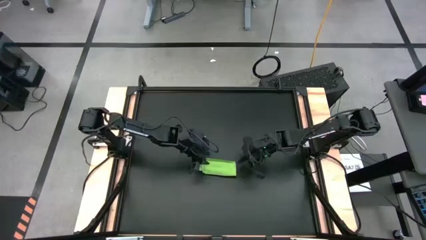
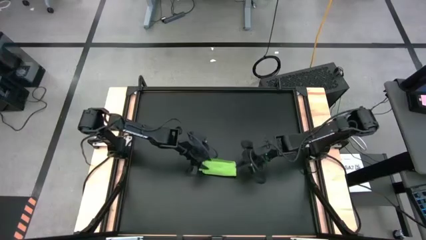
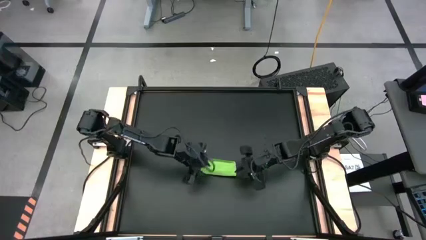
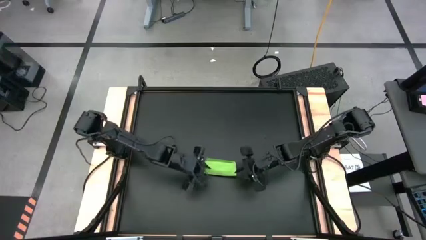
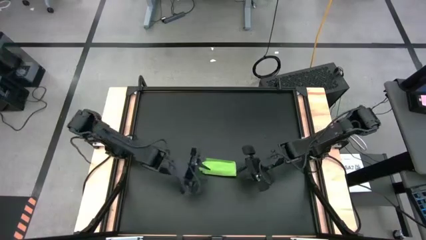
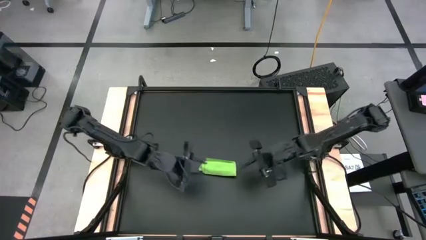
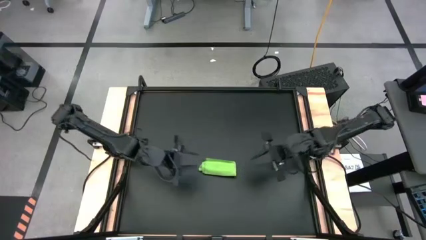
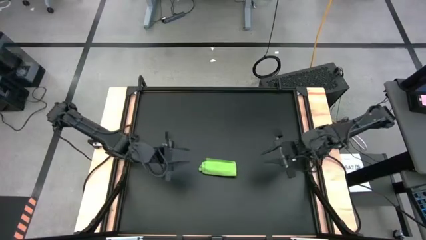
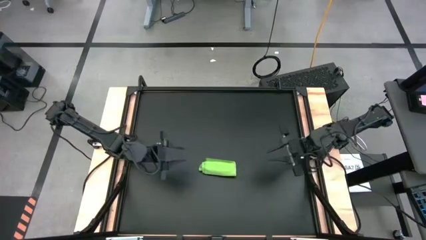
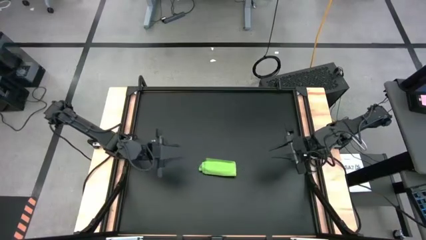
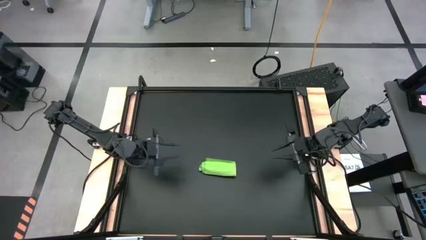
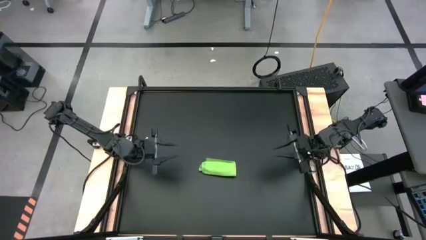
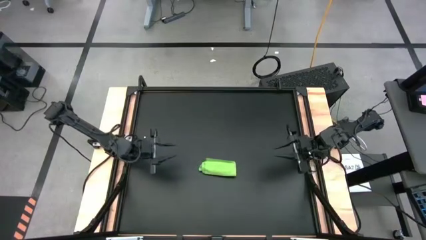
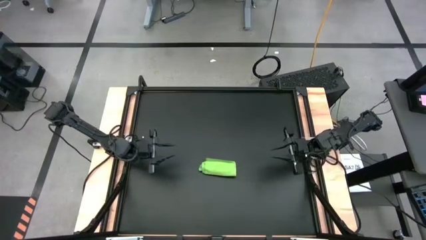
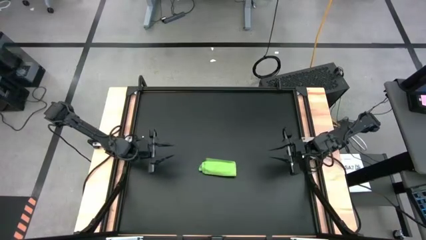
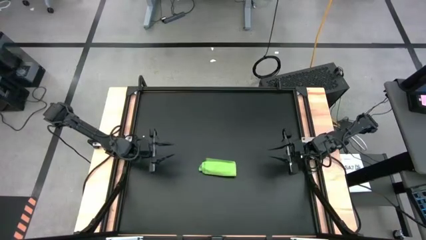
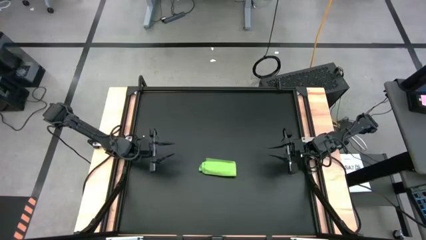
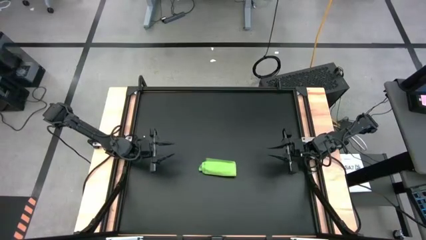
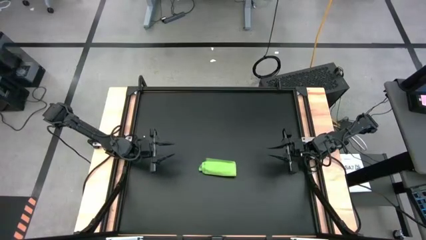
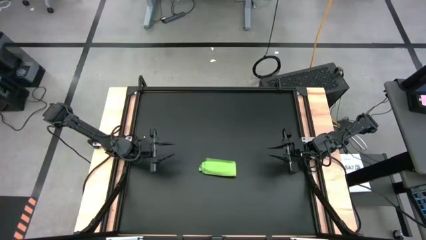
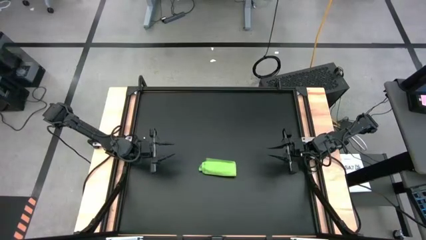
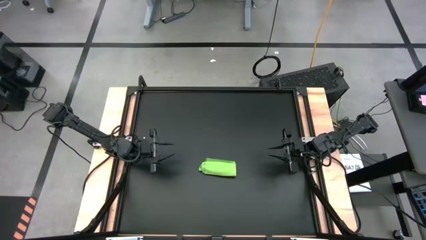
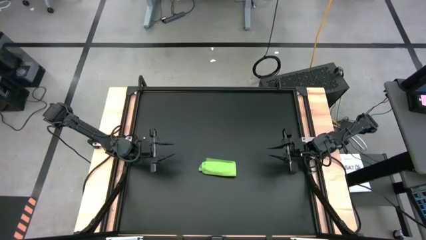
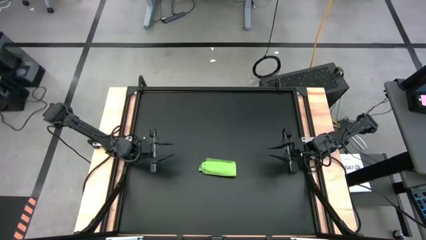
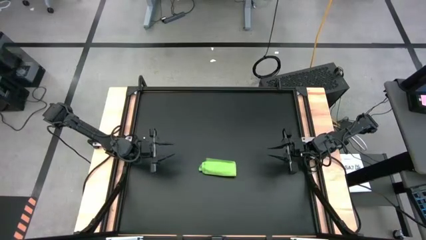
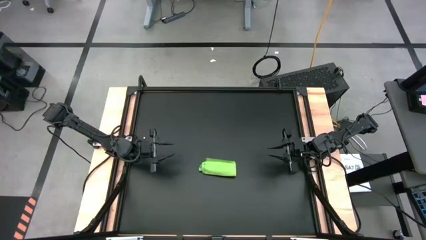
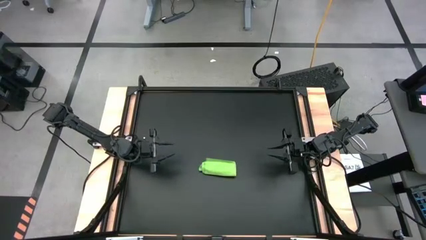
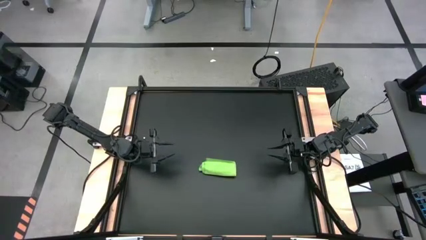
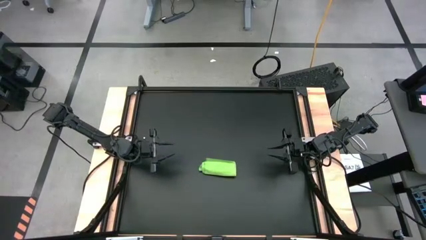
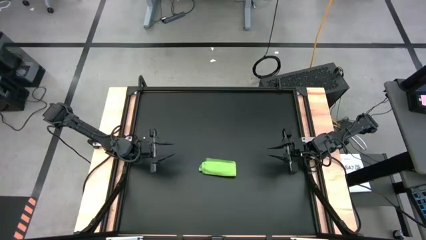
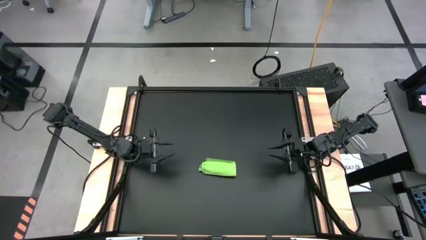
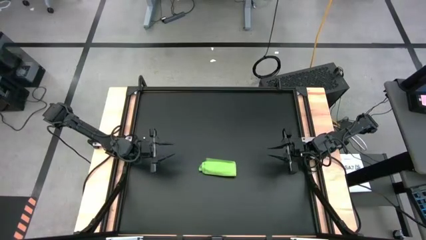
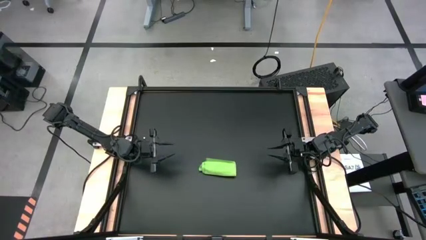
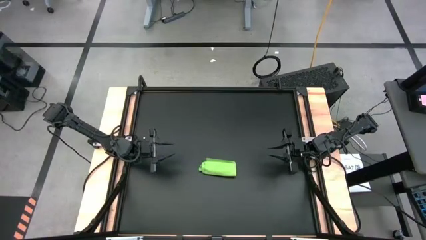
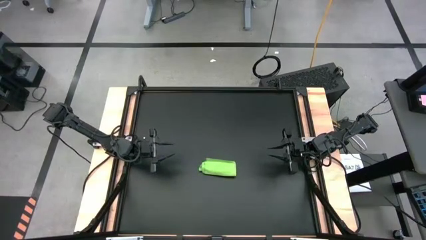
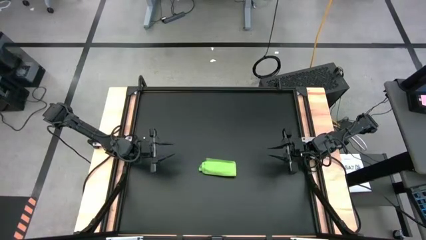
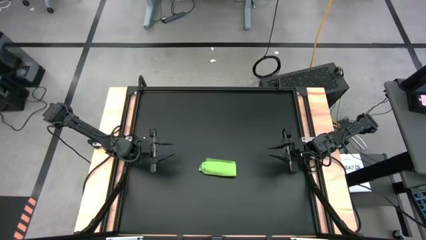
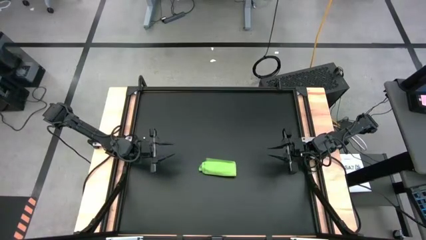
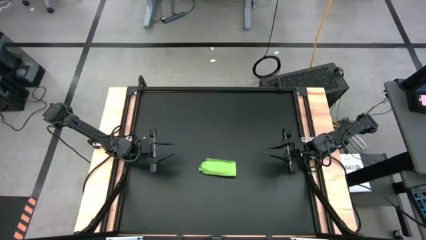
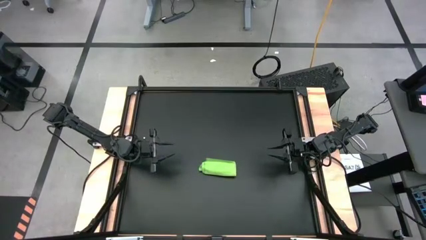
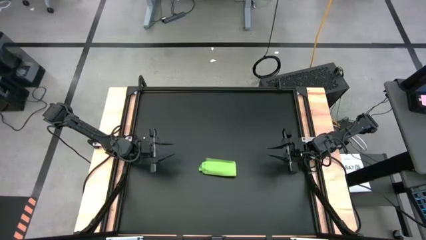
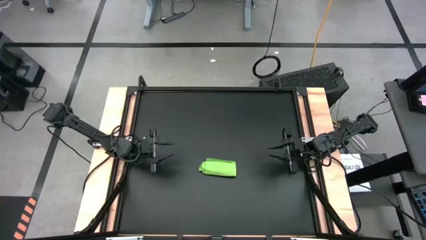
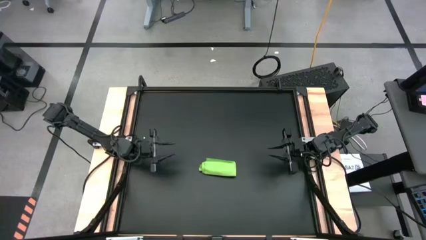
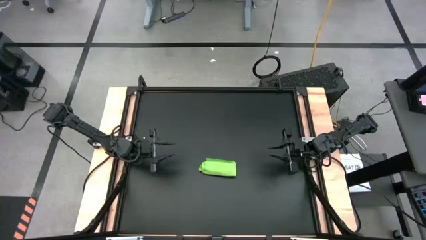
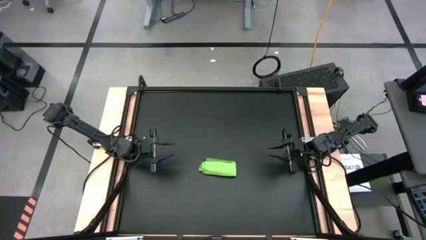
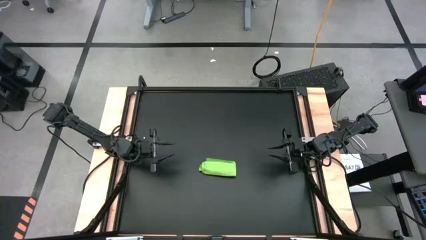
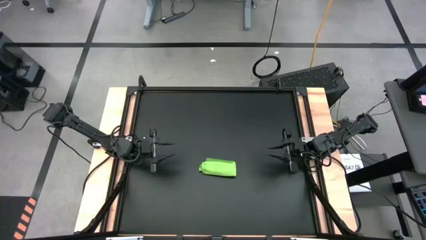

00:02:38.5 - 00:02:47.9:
Task: Roll towel into tight, uniform cylinder
Return to Home Position
